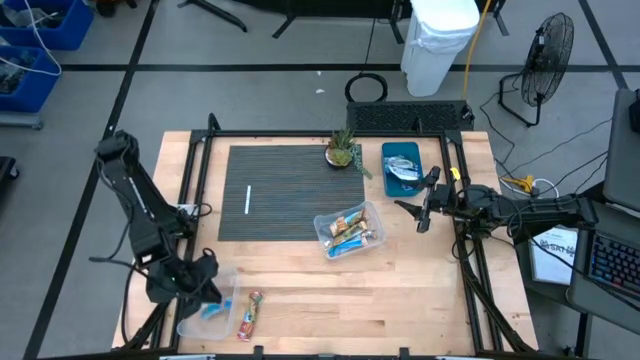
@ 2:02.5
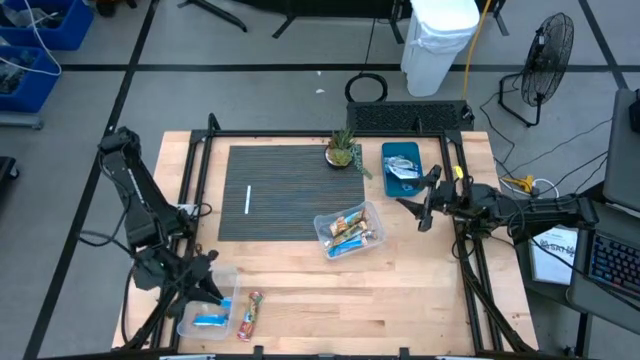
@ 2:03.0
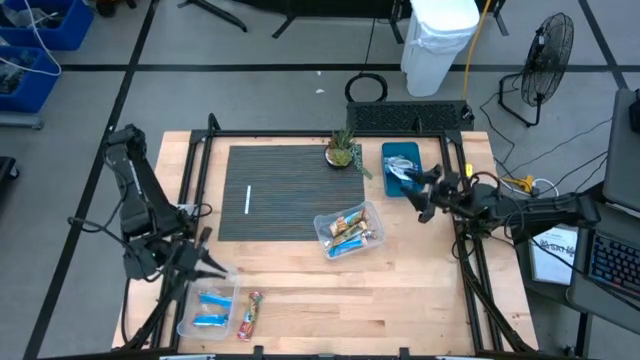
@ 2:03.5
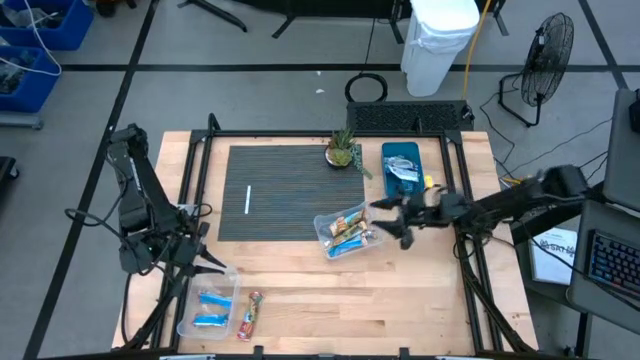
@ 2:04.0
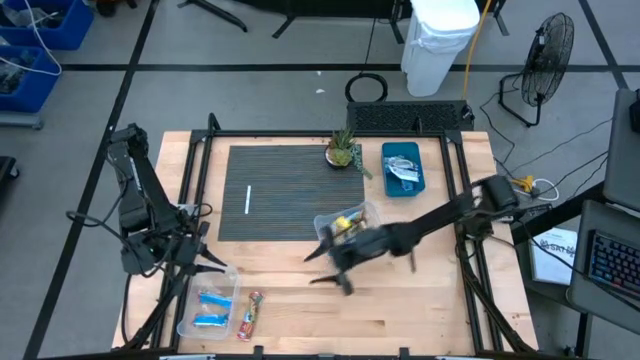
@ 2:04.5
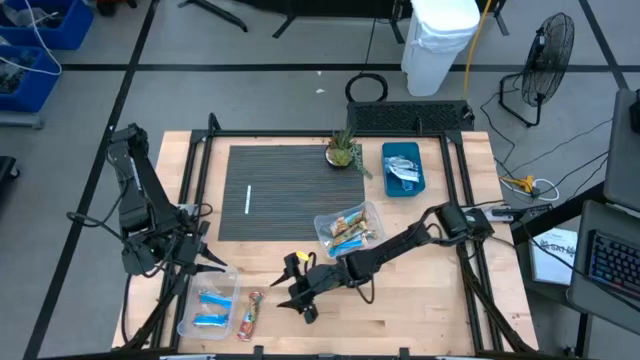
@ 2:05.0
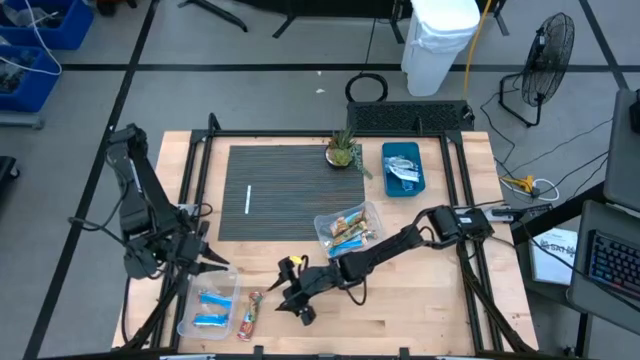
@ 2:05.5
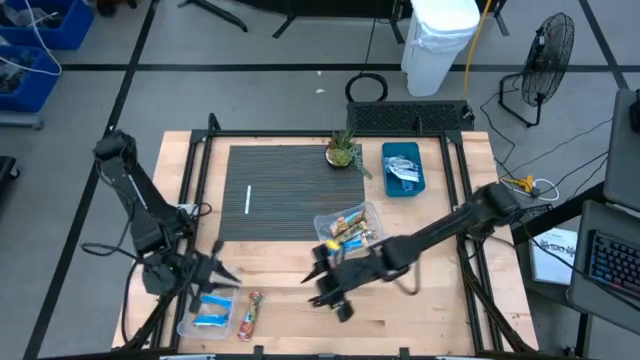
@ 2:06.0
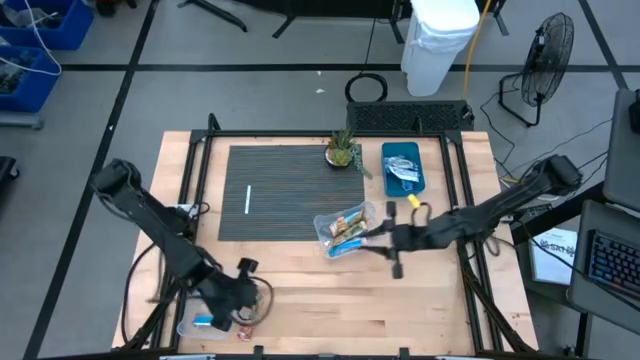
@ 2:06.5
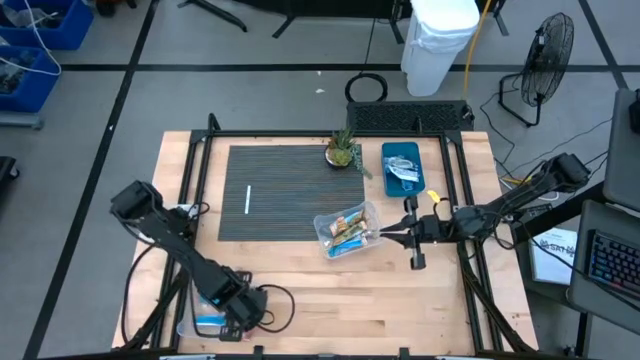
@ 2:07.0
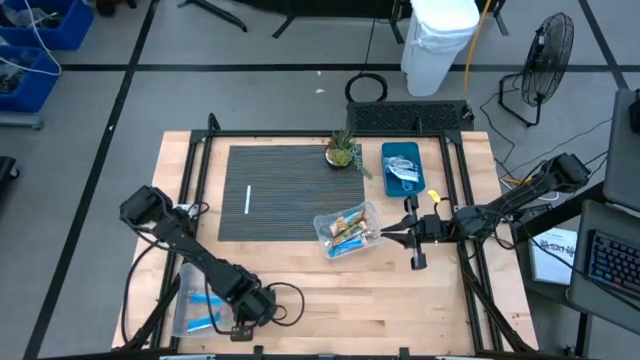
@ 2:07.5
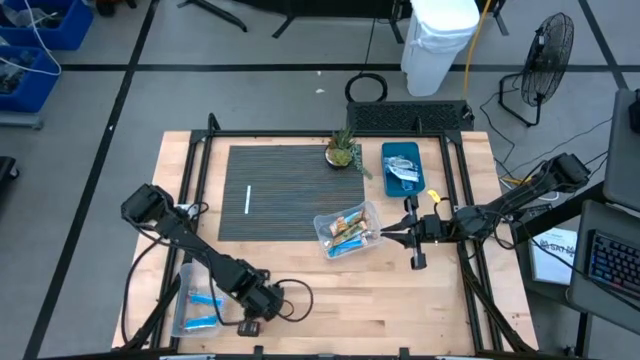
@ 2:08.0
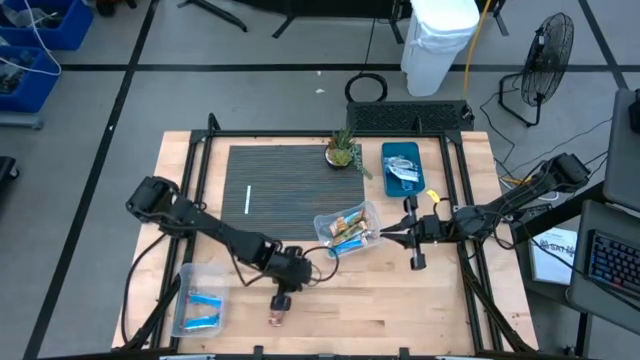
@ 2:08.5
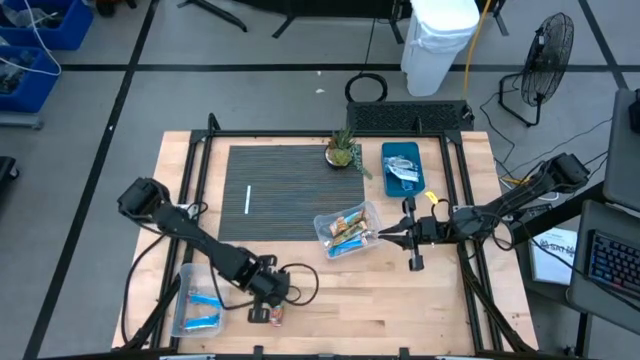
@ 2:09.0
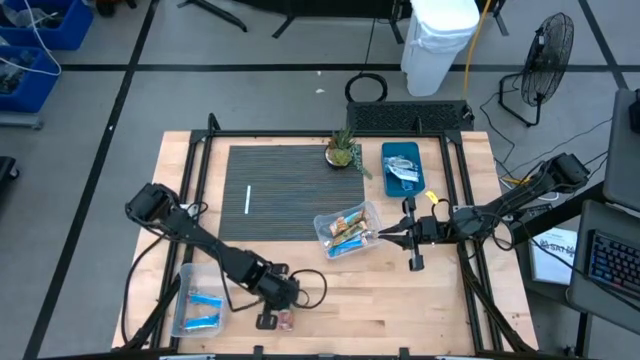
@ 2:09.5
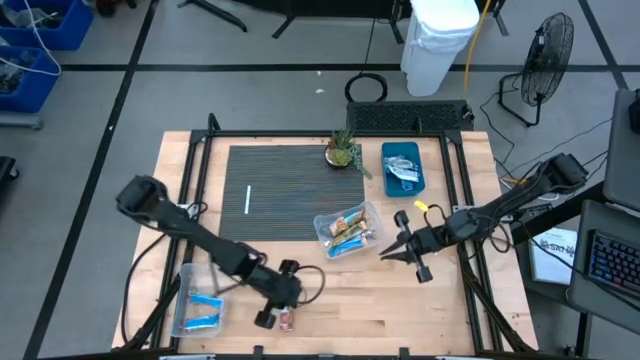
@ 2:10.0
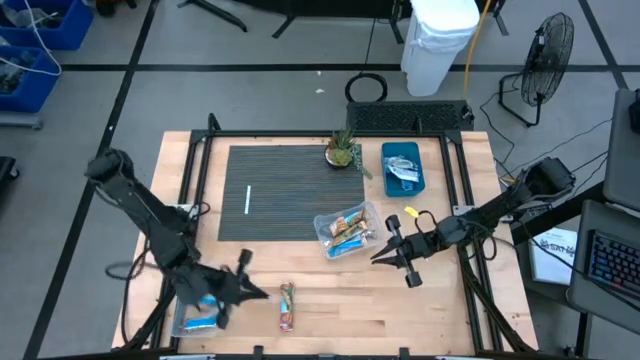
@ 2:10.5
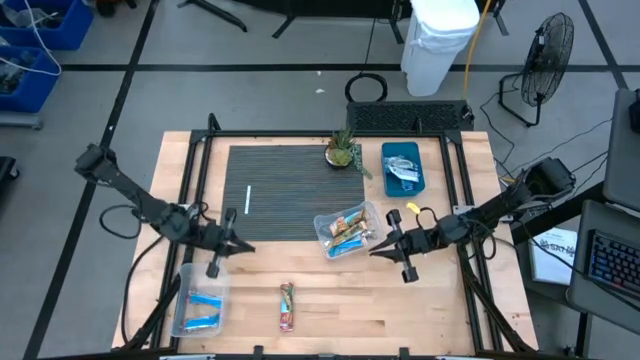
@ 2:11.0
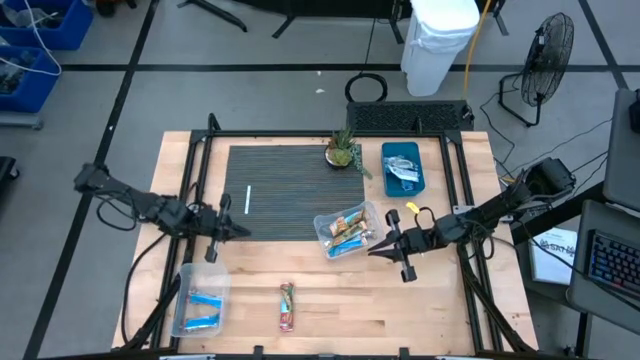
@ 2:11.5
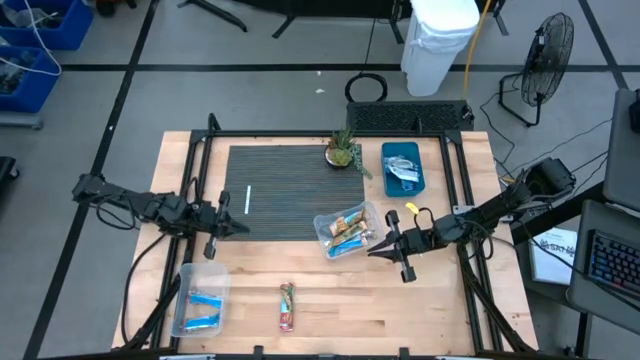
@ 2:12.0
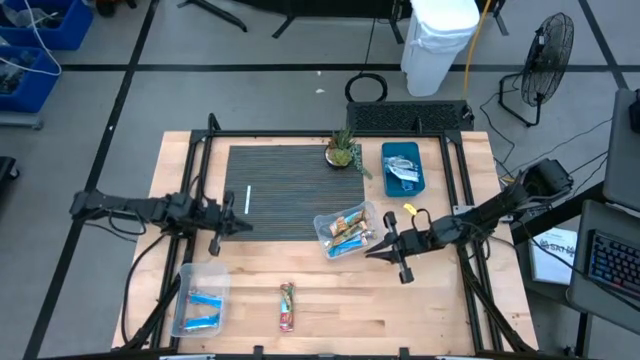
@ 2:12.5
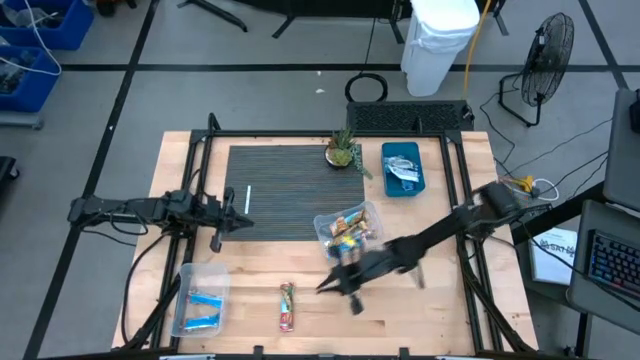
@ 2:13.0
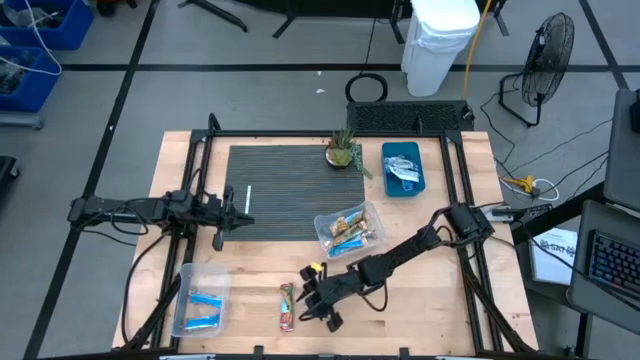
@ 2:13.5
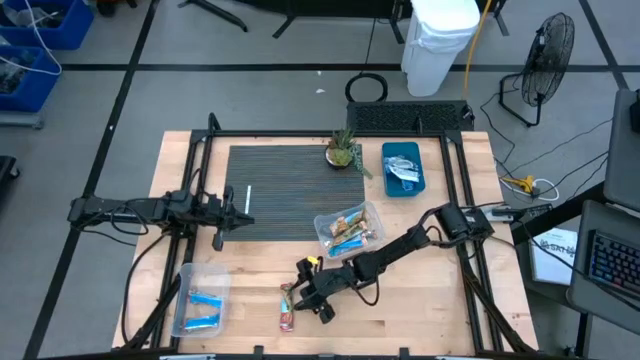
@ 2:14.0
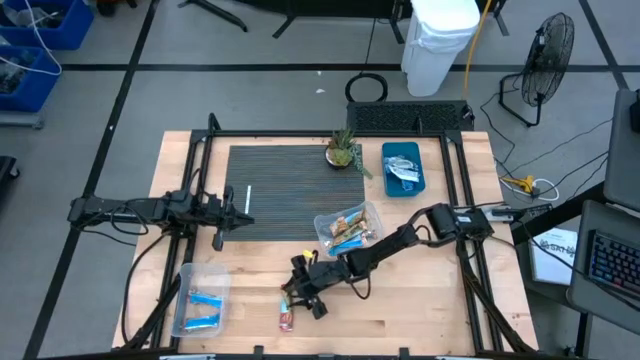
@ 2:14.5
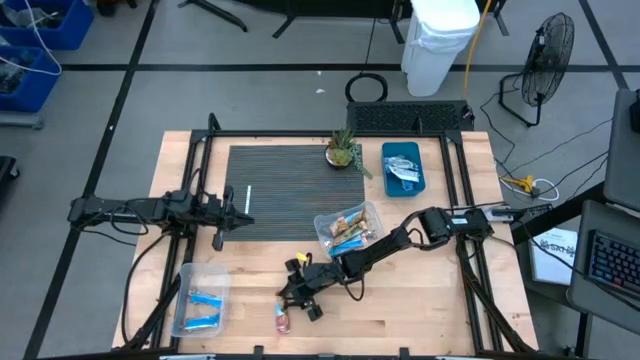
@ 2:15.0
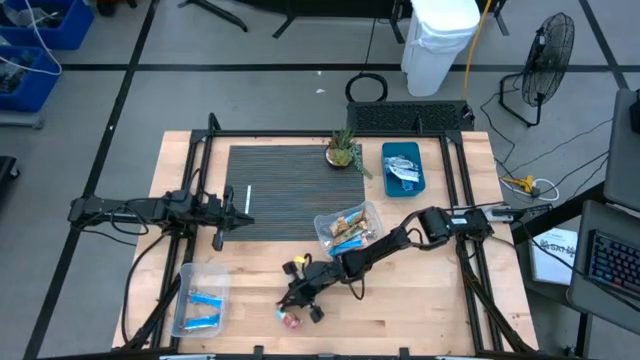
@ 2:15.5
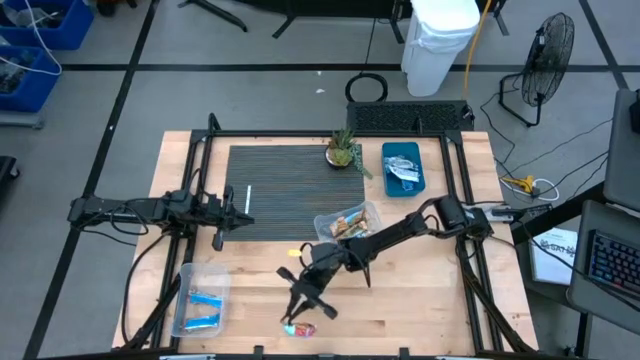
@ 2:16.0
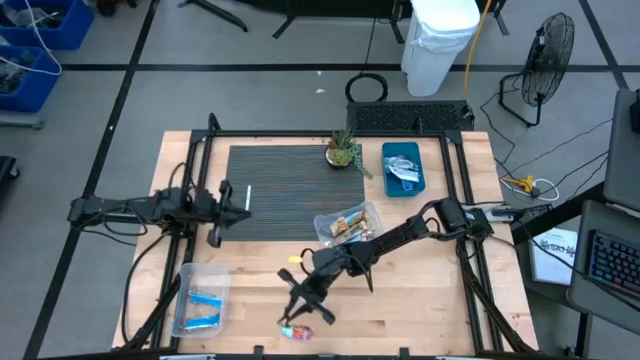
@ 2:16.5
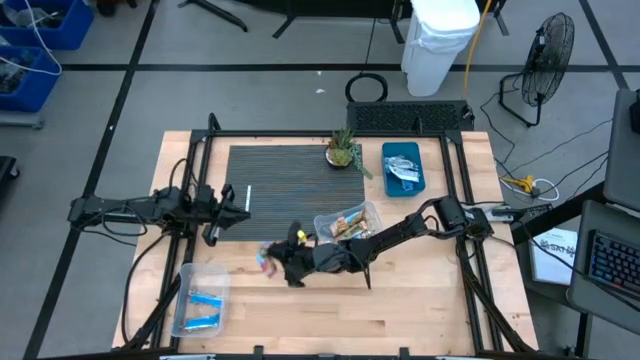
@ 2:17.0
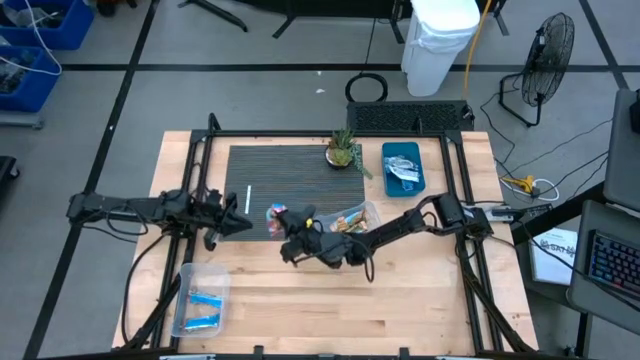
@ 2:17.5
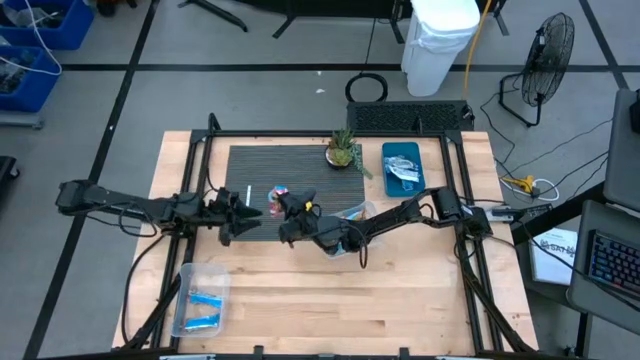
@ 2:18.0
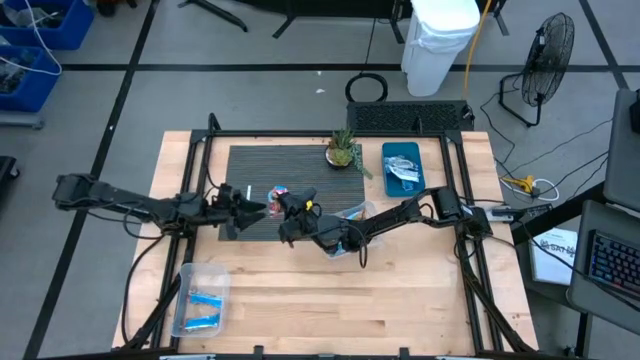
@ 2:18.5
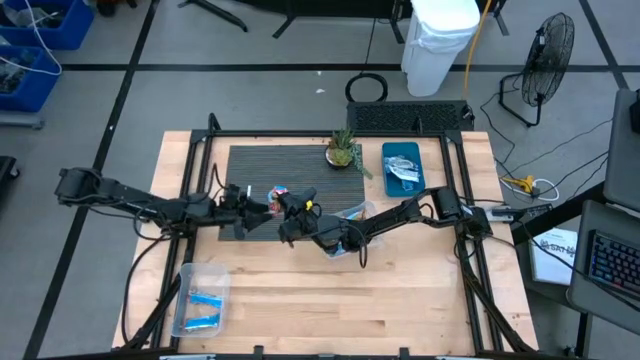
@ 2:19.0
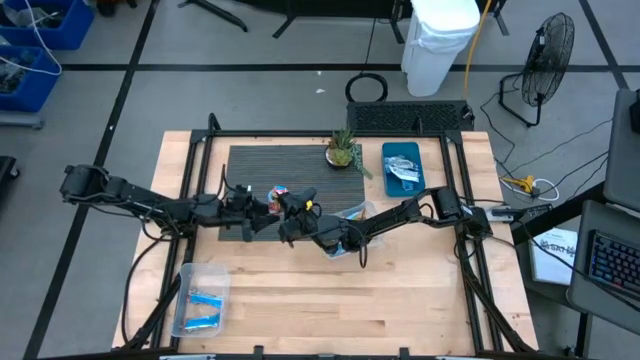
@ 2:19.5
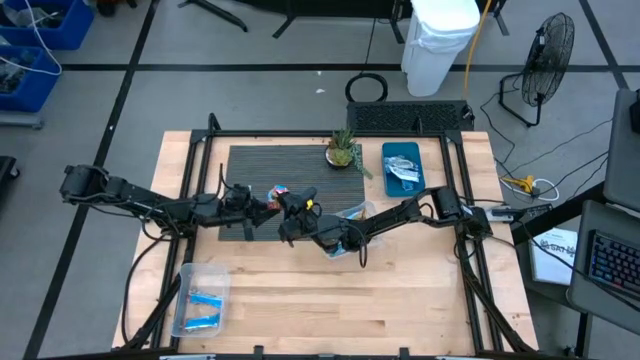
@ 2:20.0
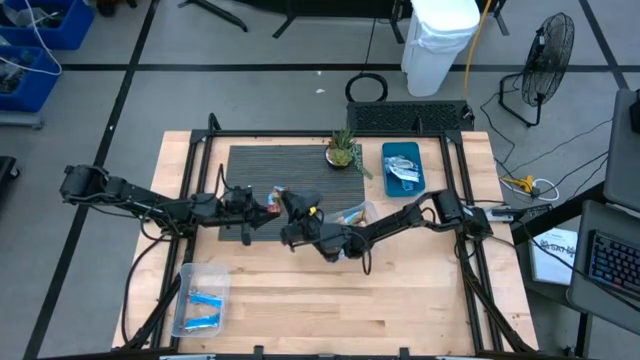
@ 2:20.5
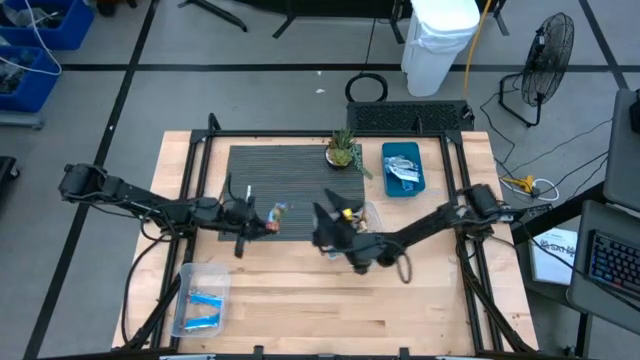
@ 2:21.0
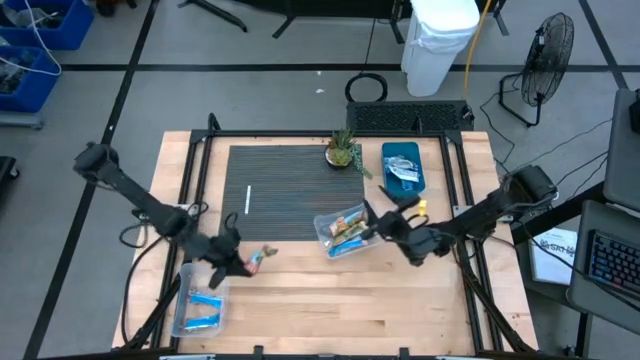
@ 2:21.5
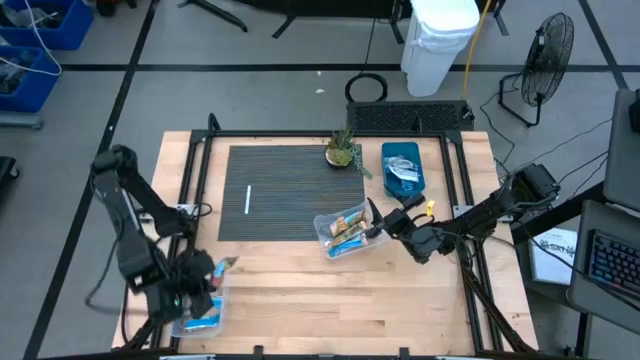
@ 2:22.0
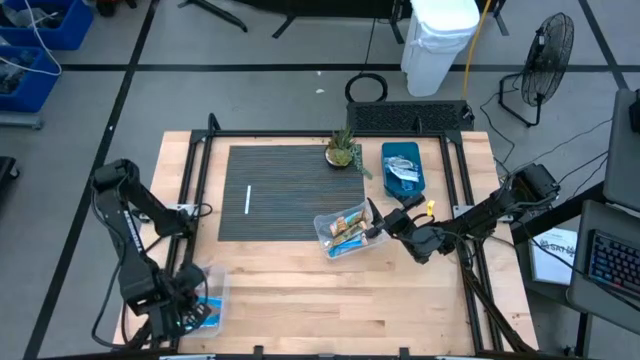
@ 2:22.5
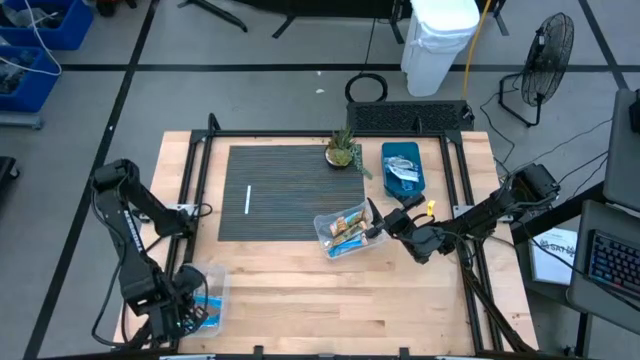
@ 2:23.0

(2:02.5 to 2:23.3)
Task: Pick and place Granola Bars by type
Put the red granola bar into the bottom transparent bin
